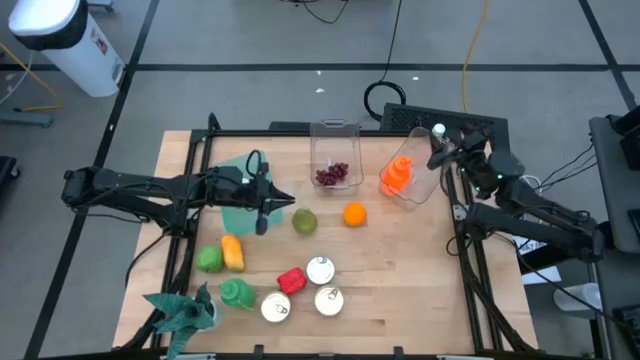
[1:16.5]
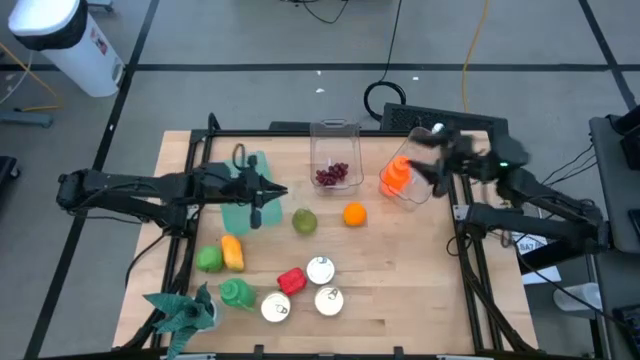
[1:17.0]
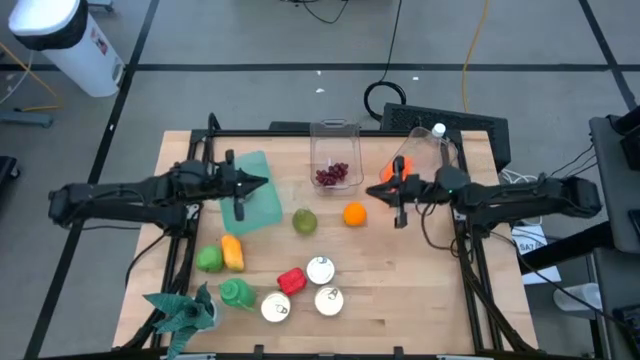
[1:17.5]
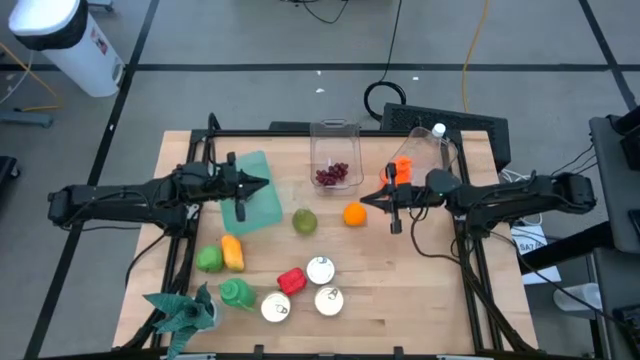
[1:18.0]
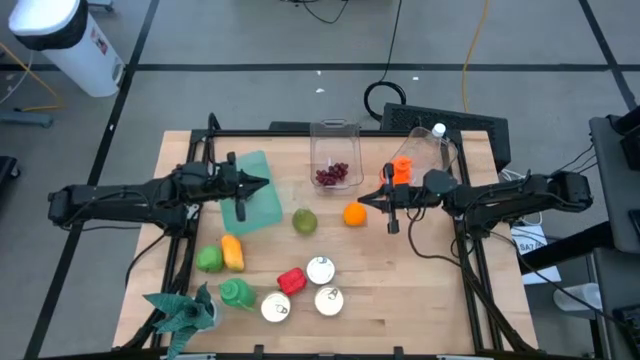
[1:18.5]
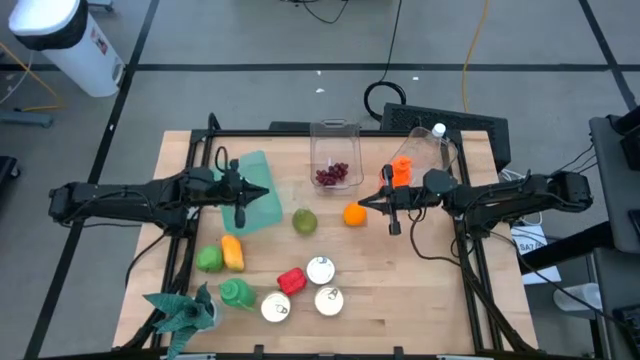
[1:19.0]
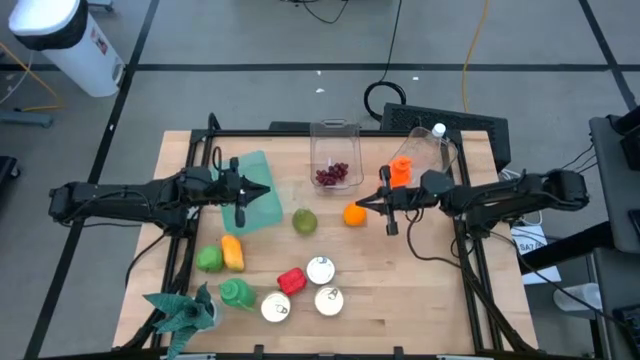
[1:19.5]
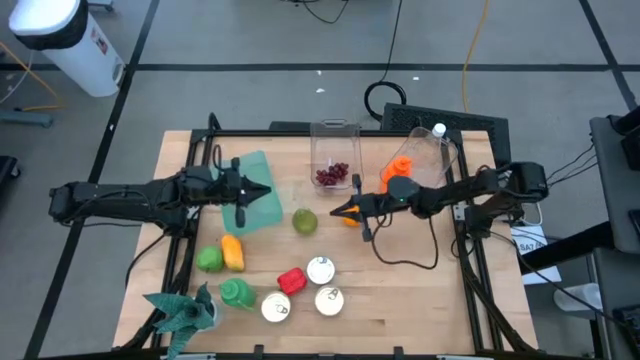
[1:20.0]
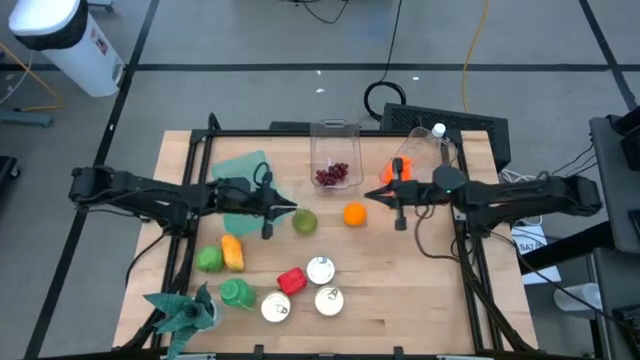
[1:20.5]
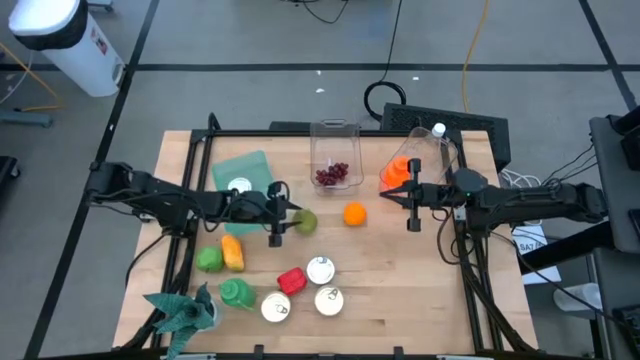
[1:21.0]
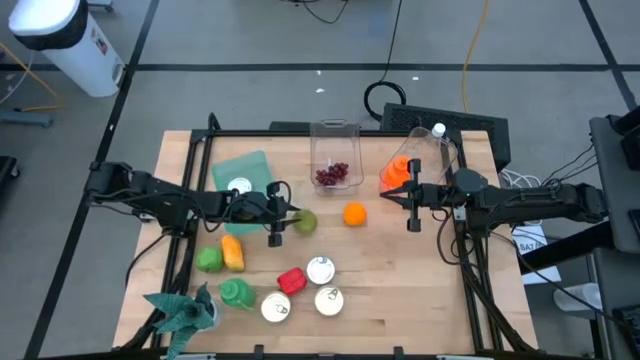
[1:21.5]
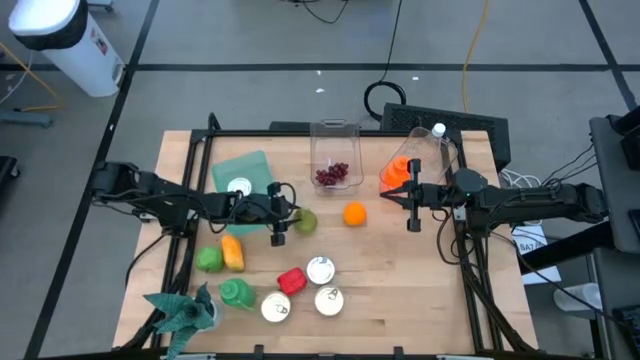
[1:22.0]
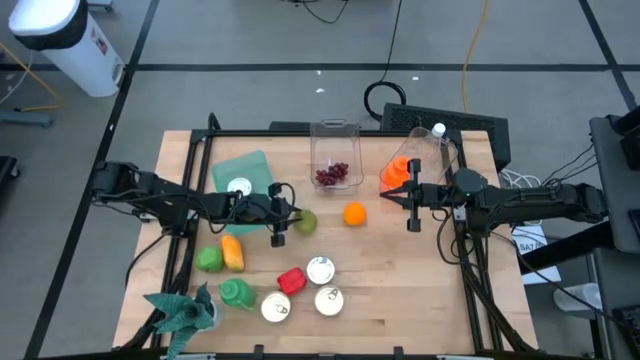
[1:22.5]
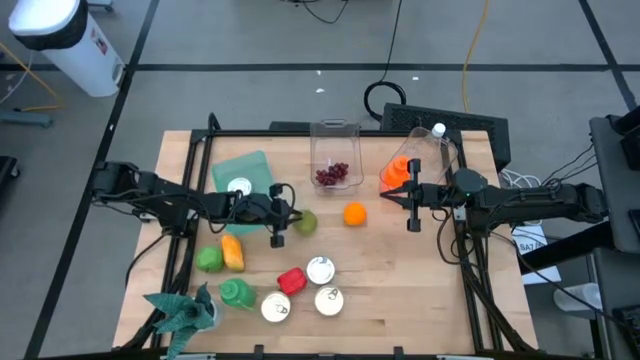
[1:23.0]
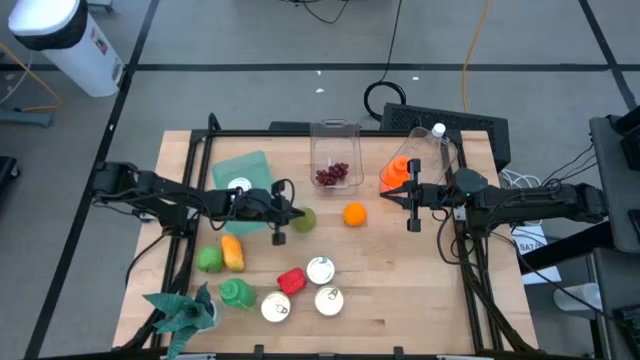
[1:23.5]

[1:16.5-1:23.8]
Task: Pick & Place Food Item
Put the green pear into the left transparent bin

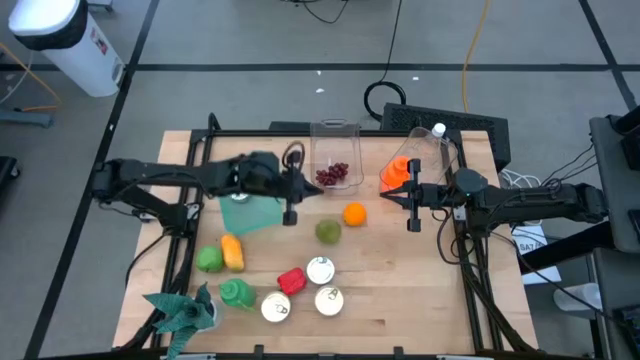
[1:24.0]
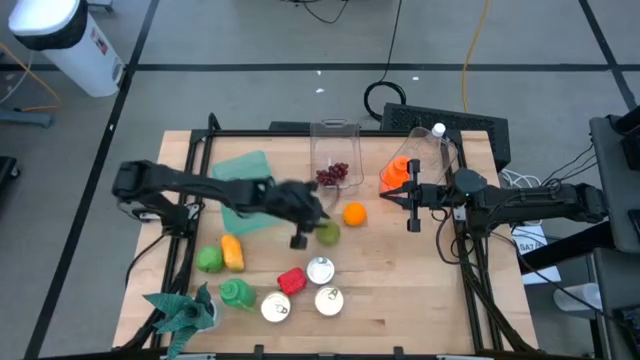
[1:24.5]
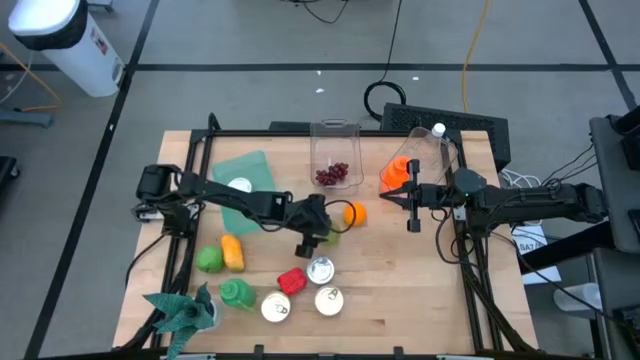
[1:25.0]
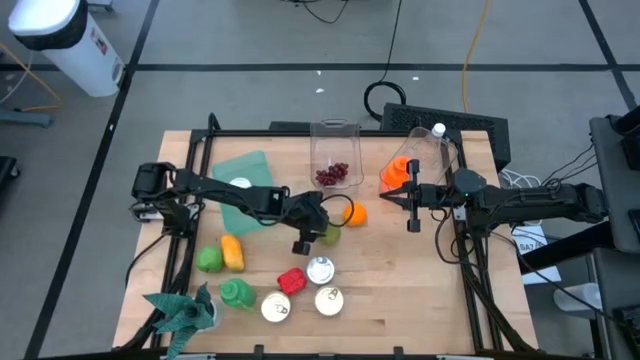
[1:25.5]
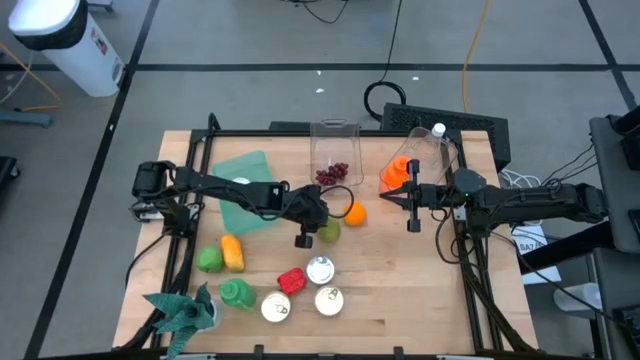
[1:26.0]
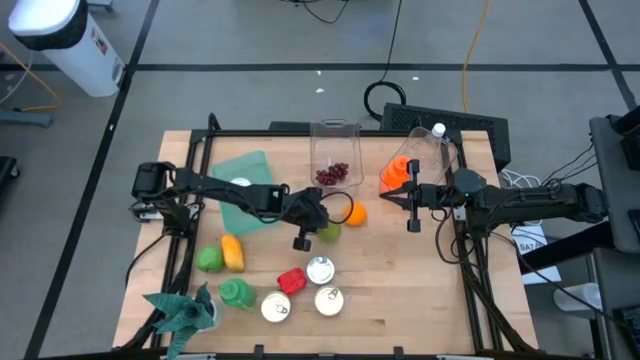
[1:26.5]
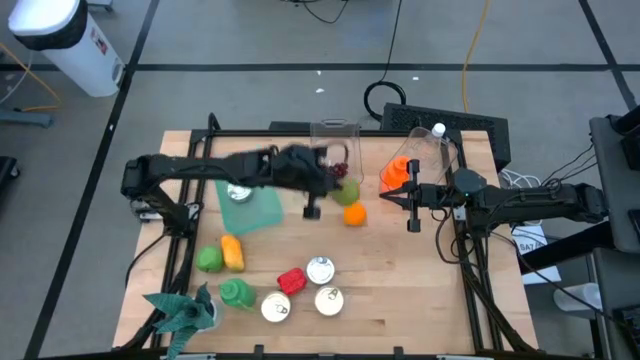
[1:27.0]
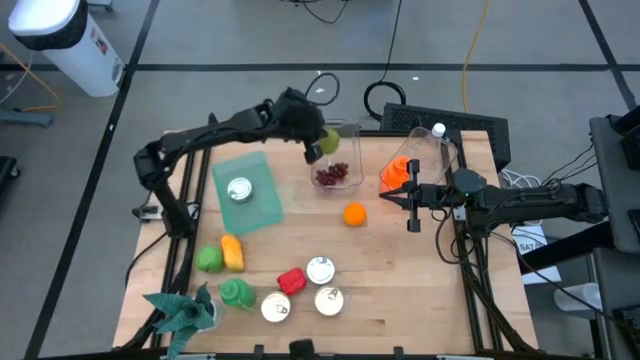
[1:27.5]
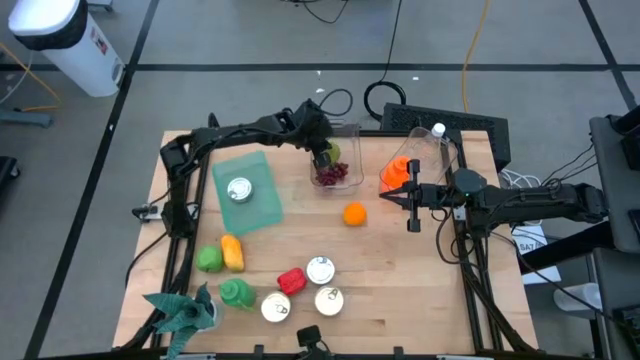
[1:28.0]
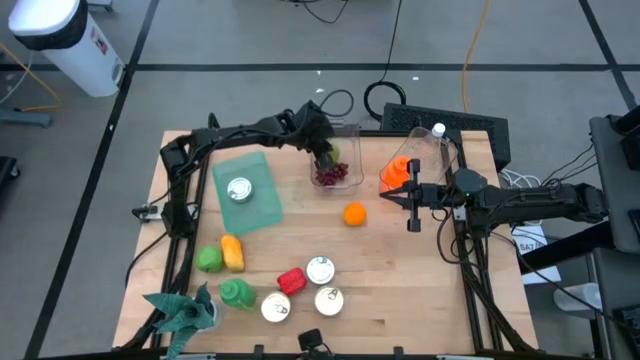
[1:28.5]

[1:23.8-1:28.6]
Put the pear into the left transparent bin
